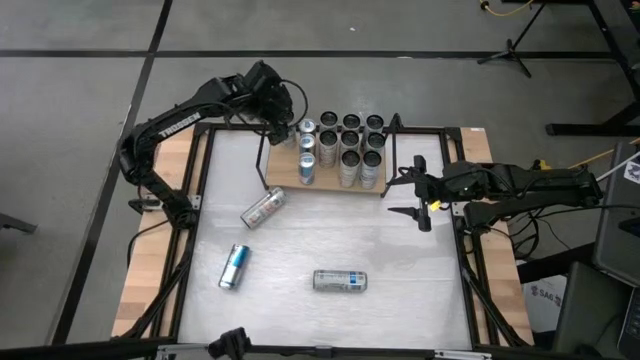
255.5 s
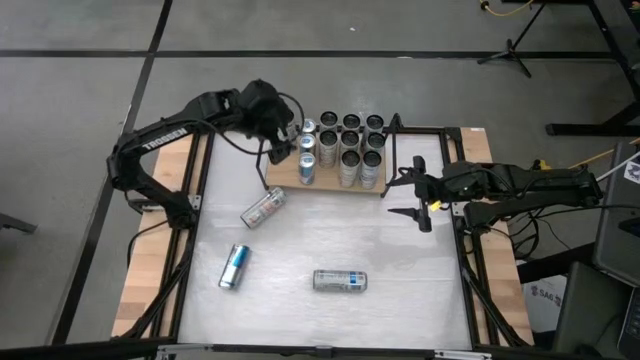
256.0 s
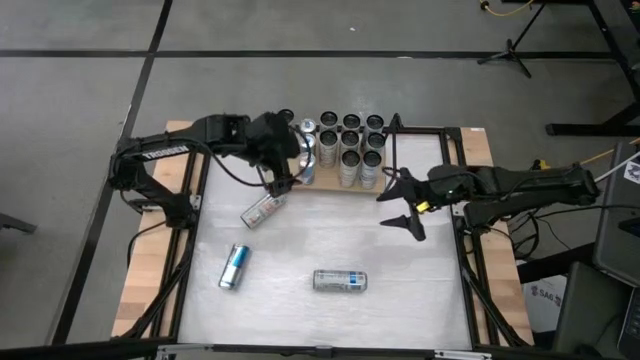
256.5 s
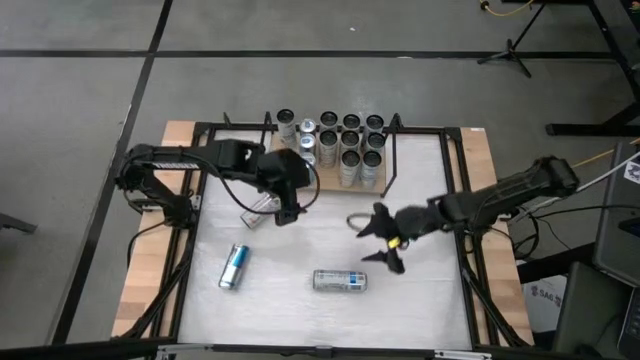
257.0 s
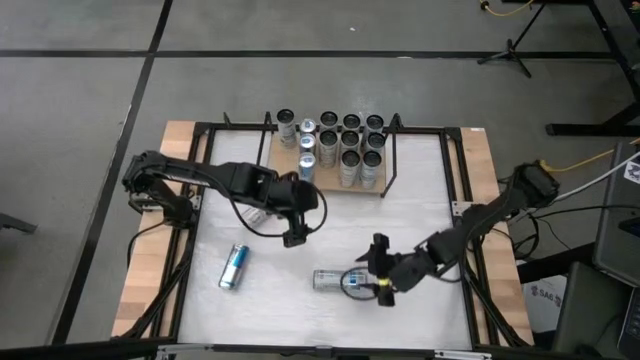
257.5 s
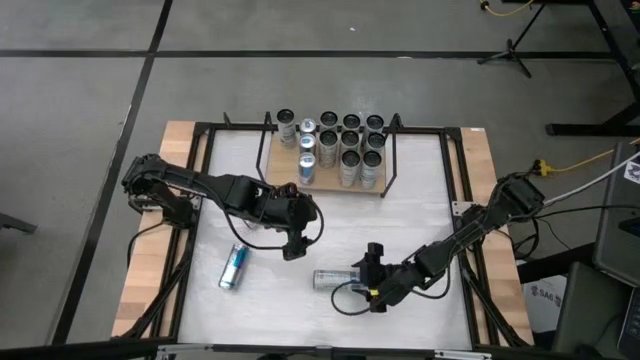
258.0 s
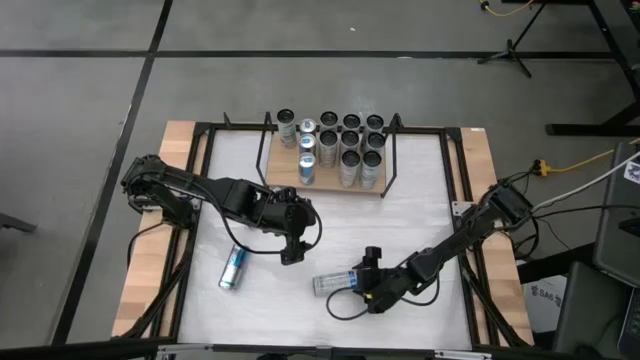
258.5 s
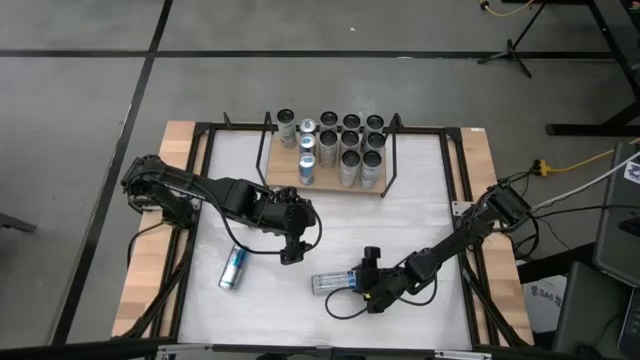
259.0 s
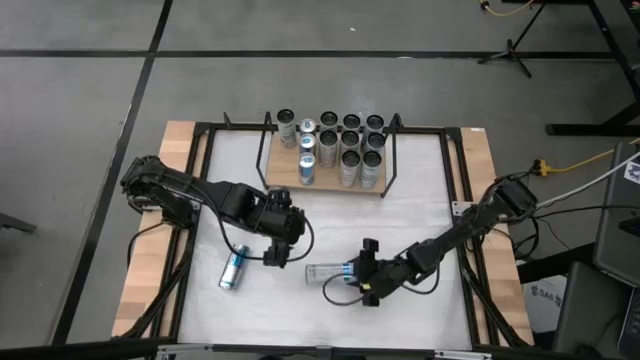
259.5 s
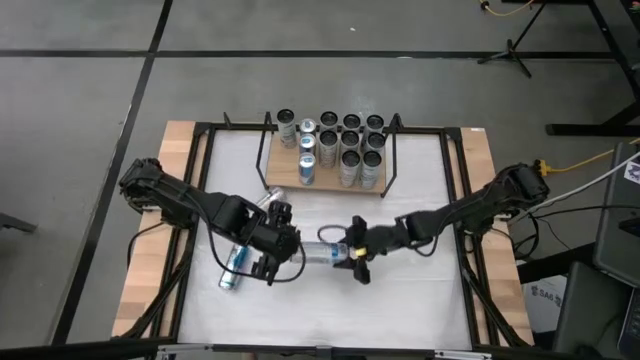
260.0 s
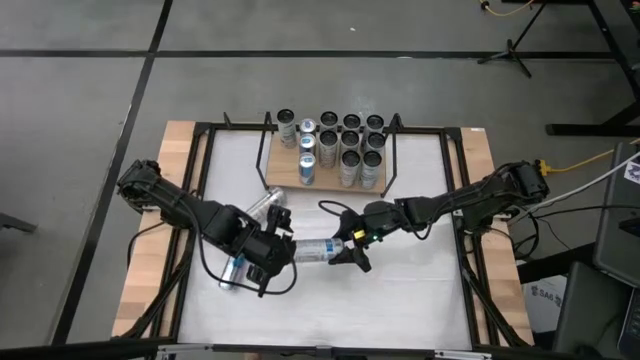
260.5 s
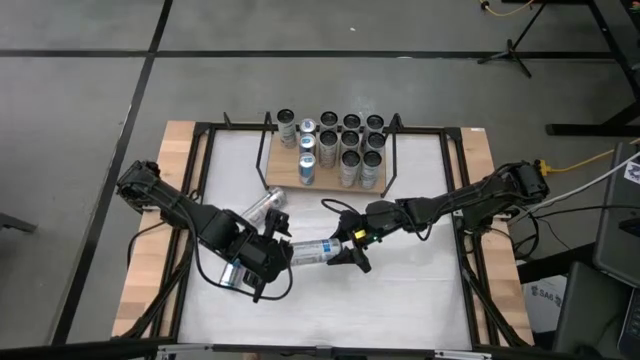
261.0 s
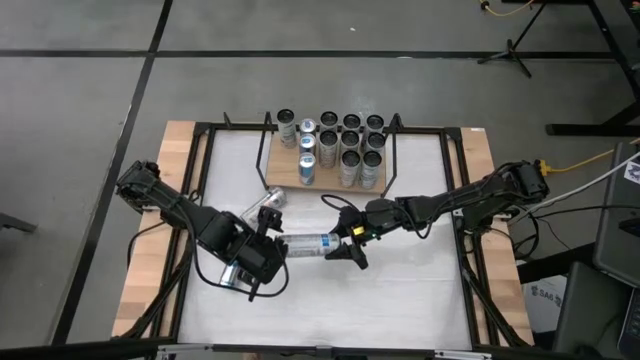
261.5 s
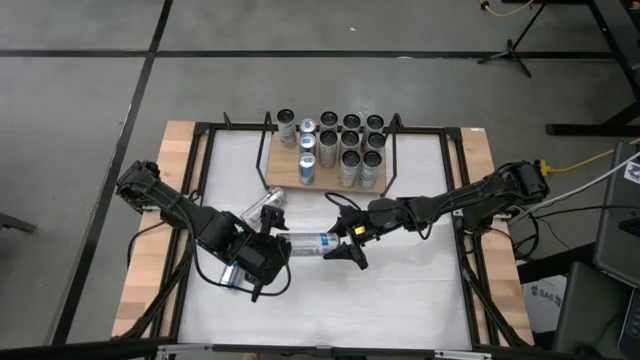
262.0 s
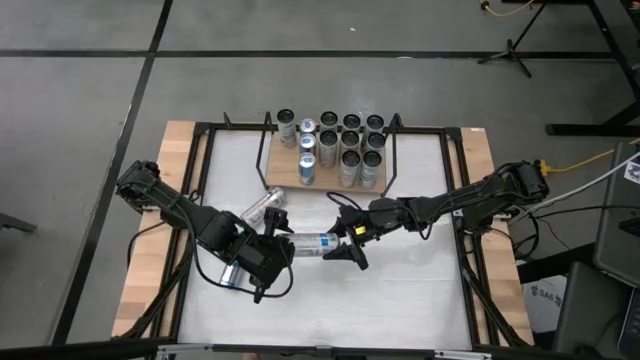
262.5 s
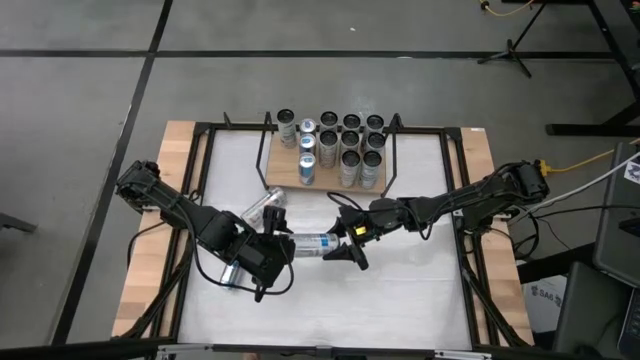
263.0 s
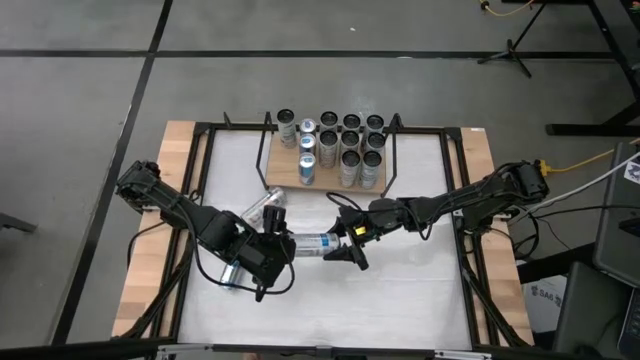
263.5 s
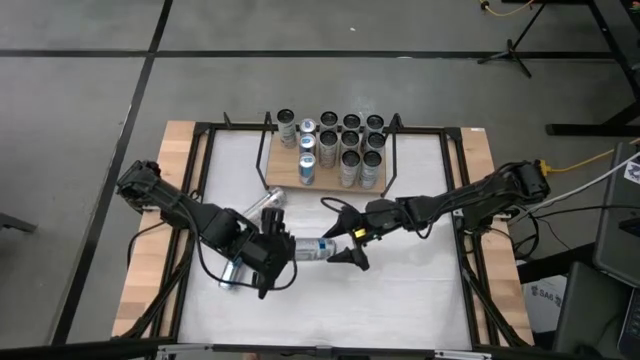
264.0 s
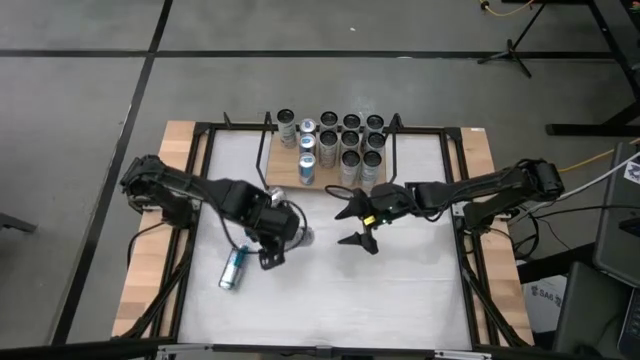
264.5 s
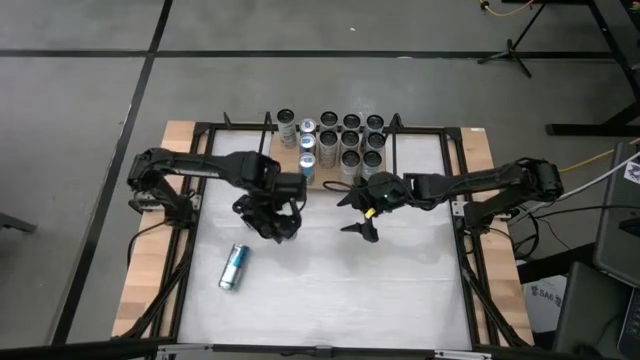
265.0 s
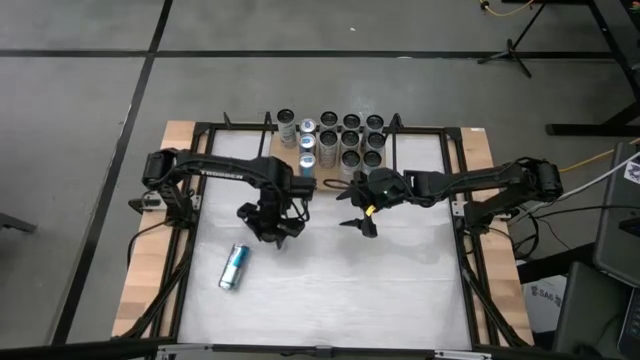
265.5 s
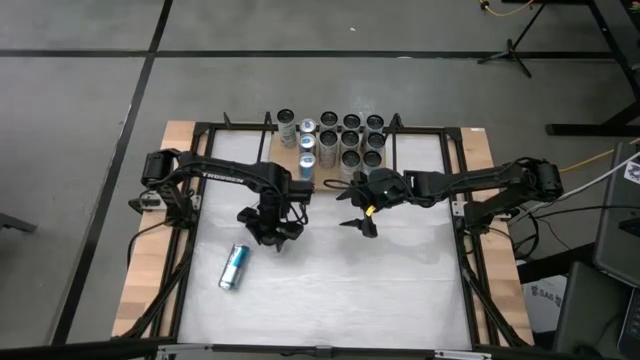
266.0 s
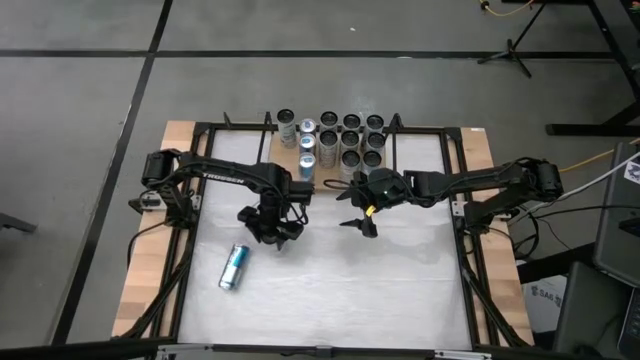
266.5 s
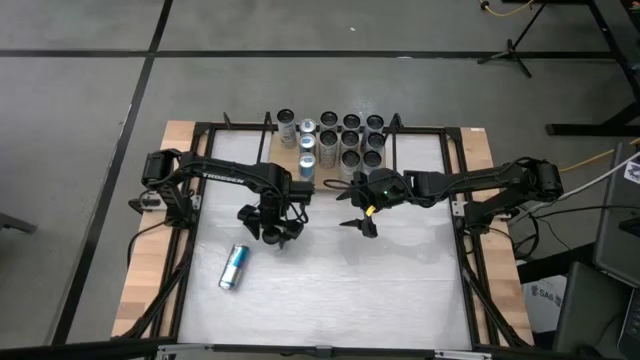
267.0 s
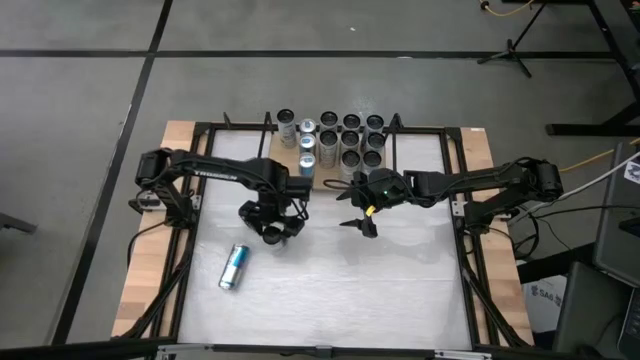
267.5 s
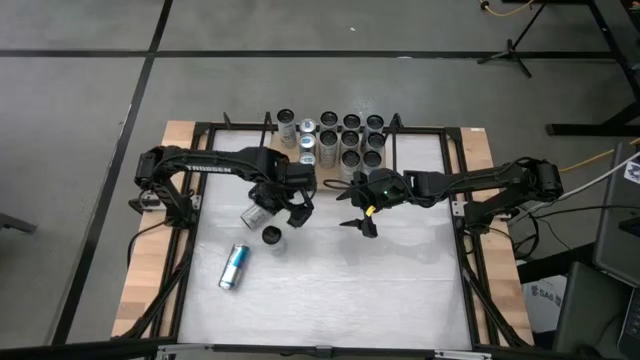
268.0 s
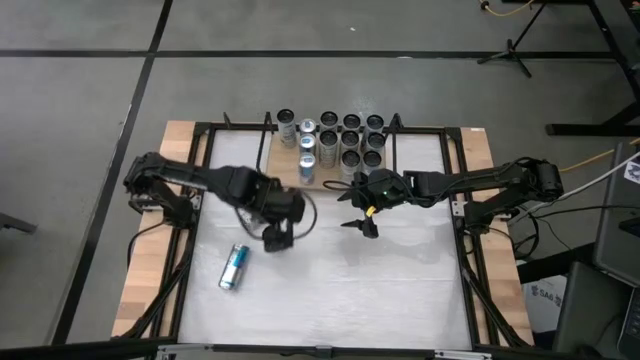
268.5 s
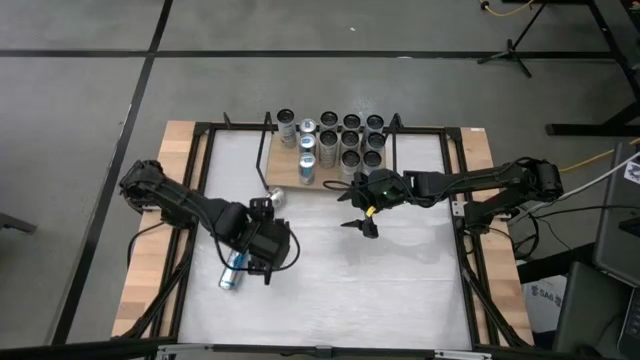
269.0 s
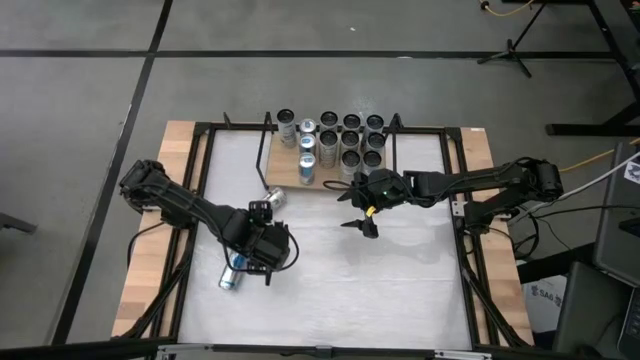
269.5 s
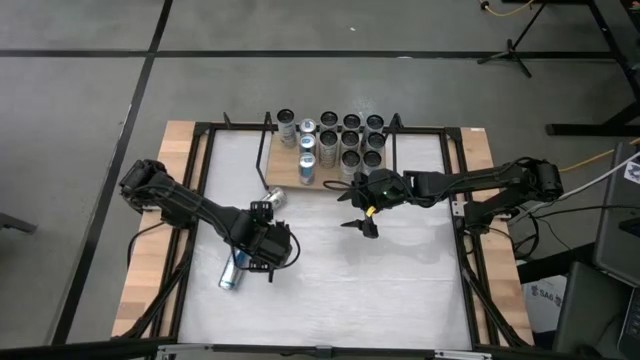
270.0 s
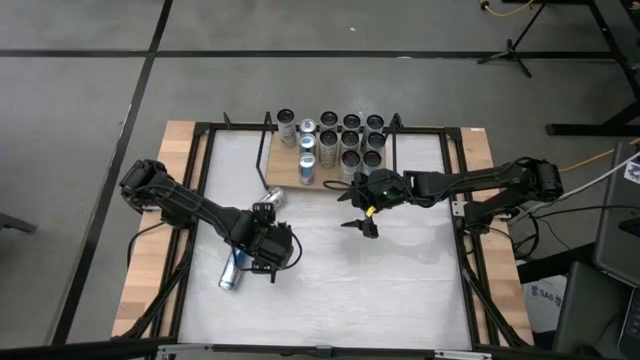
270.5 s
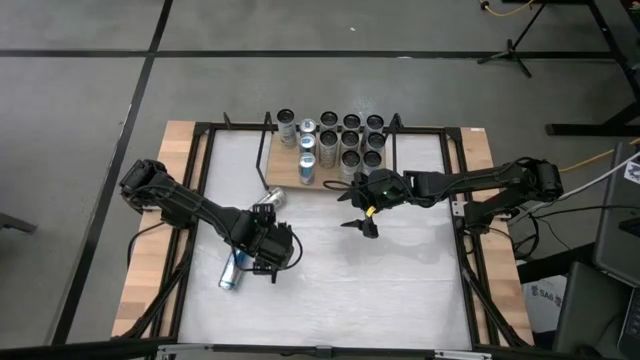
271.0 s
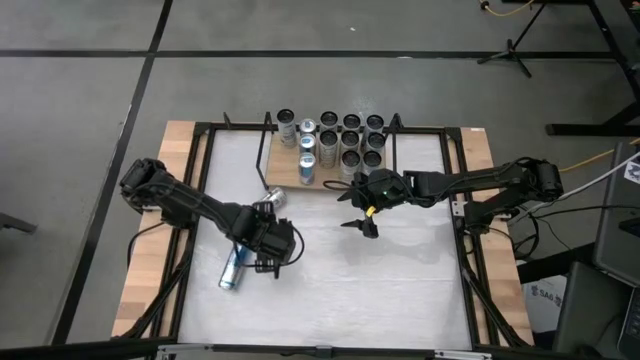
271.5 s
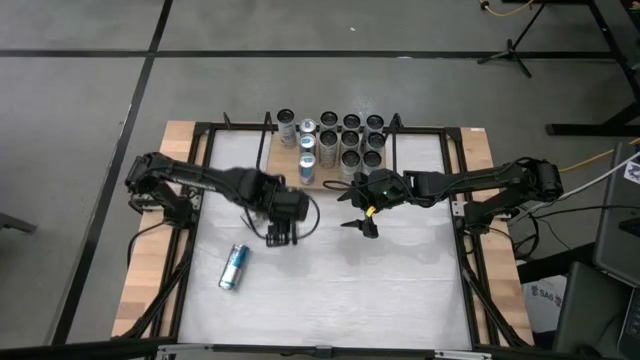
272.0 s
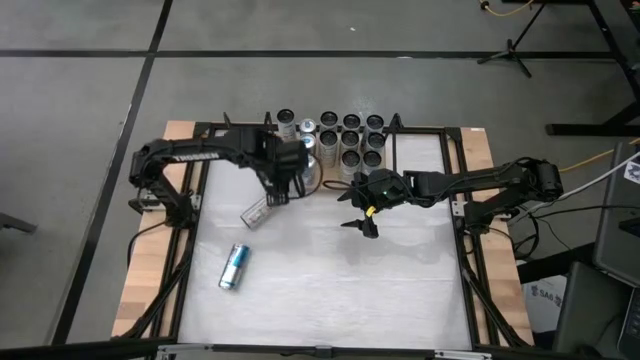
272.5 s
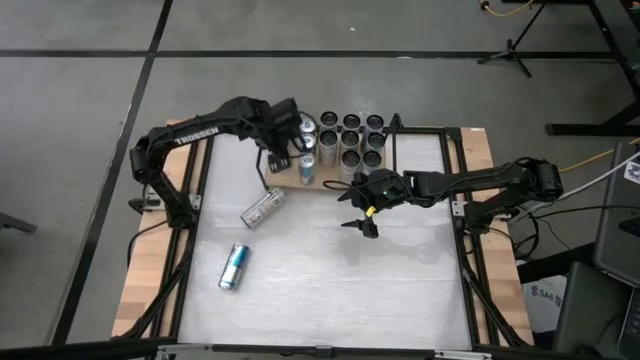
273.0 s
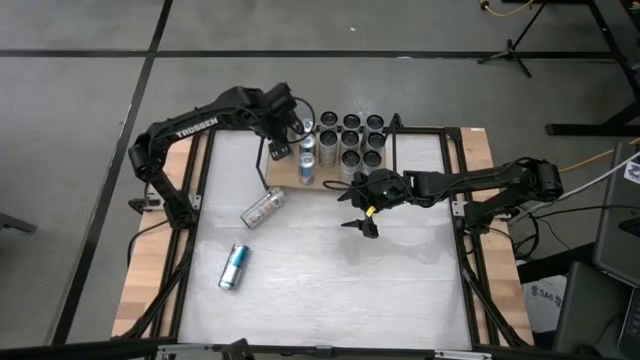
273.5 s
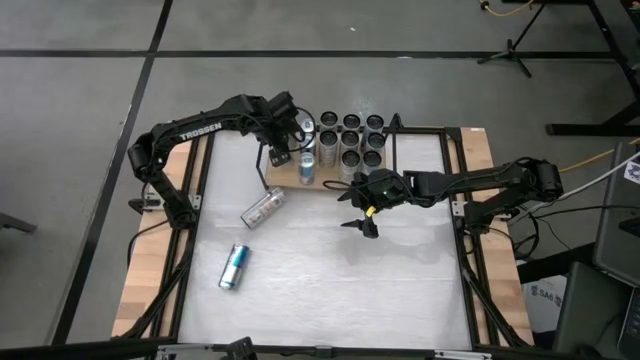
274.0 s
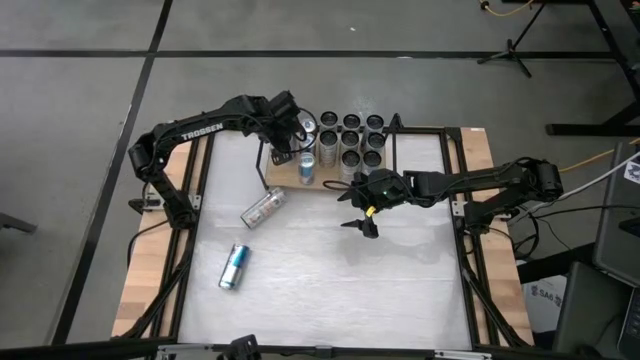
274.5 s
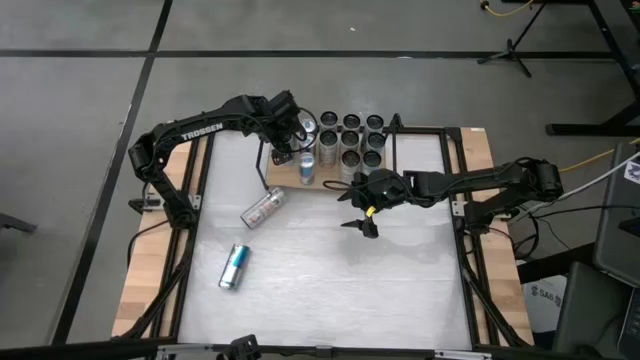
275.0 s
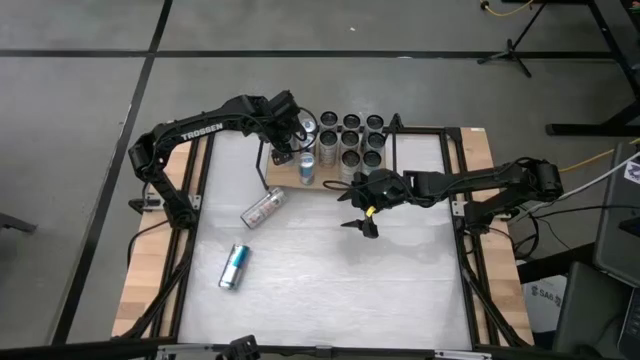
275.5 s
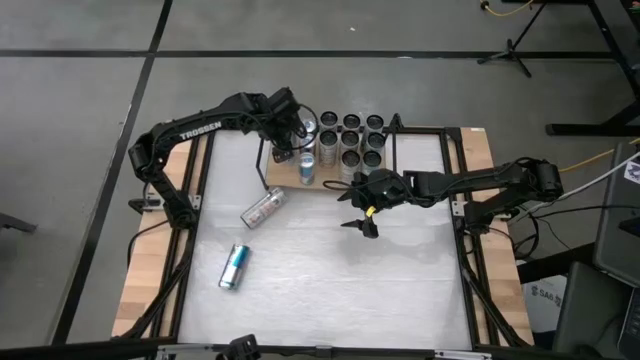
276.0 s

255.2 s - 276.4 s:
Task: Place canned beverage on shelf
Put the white soda can aligned with the other white soda can on the shelf
